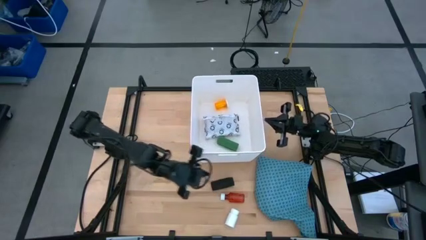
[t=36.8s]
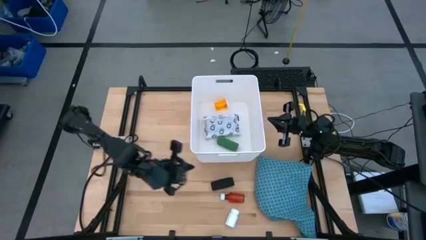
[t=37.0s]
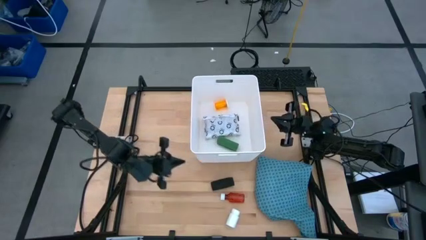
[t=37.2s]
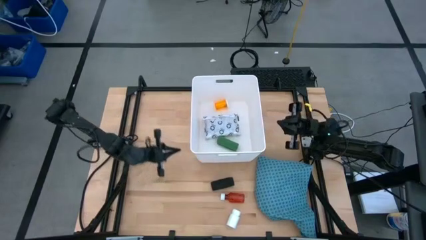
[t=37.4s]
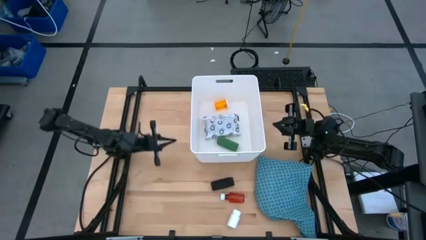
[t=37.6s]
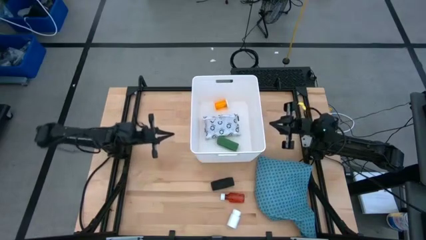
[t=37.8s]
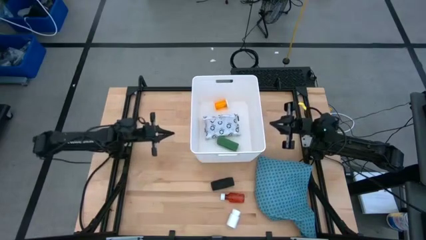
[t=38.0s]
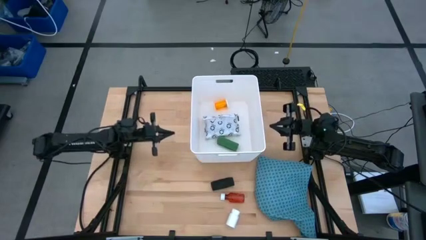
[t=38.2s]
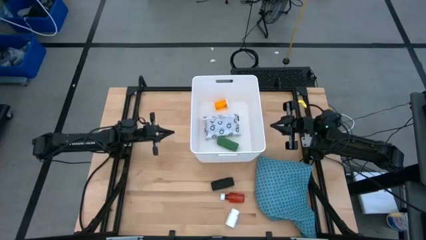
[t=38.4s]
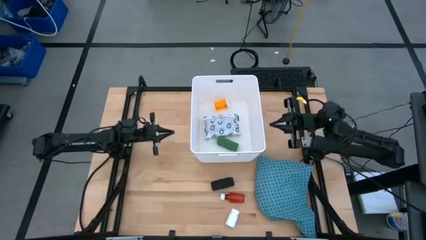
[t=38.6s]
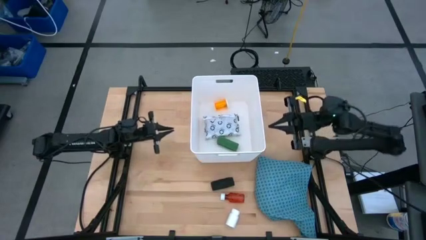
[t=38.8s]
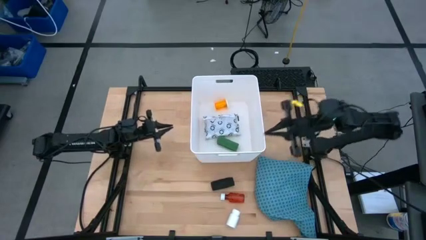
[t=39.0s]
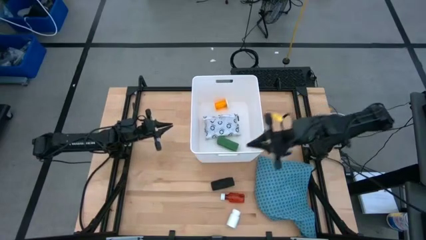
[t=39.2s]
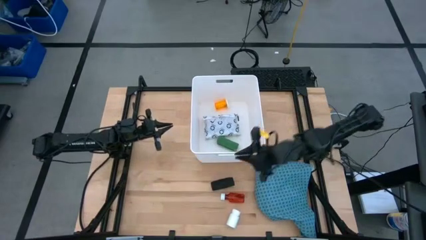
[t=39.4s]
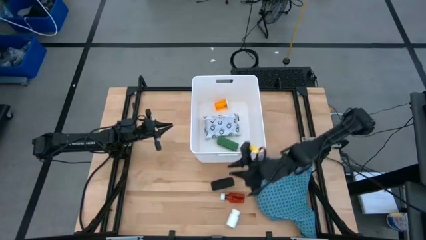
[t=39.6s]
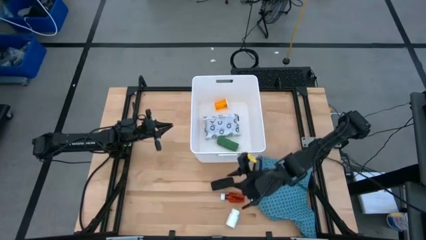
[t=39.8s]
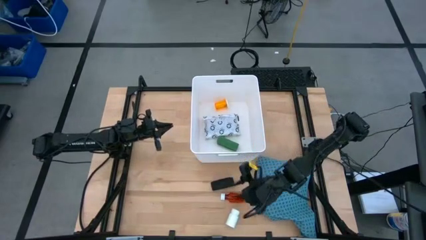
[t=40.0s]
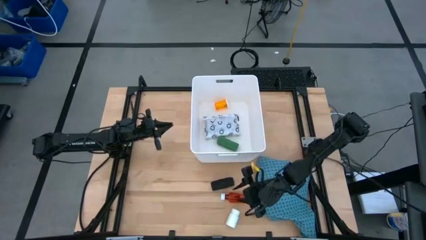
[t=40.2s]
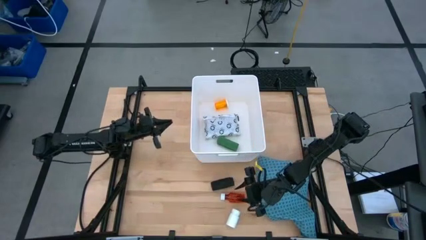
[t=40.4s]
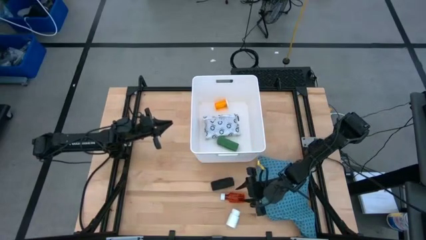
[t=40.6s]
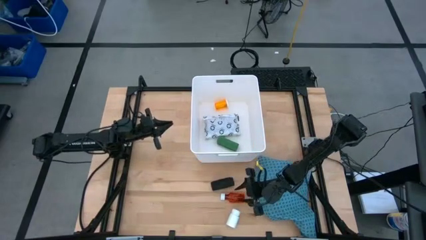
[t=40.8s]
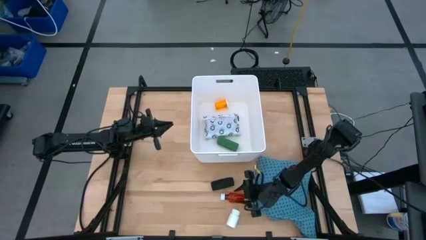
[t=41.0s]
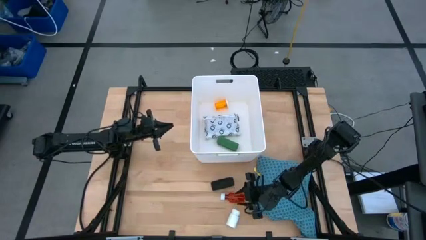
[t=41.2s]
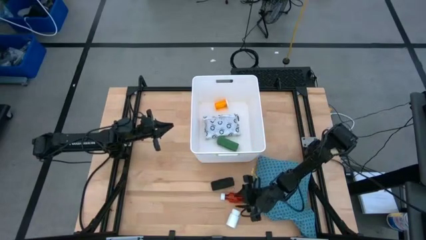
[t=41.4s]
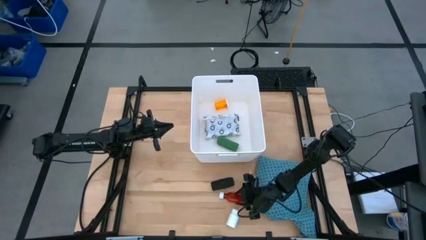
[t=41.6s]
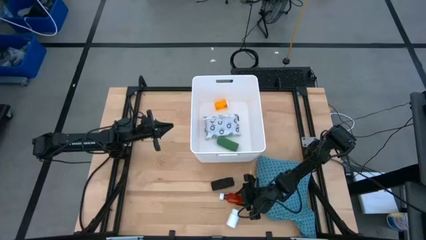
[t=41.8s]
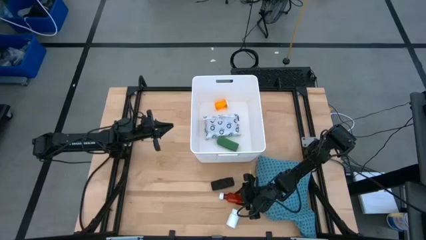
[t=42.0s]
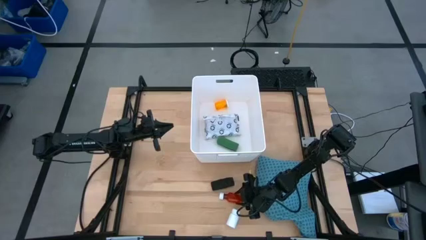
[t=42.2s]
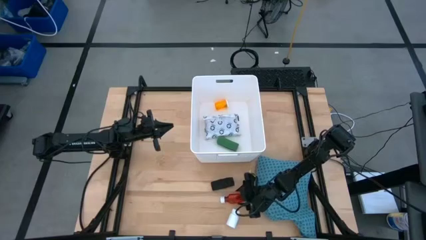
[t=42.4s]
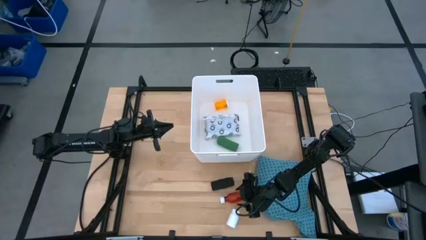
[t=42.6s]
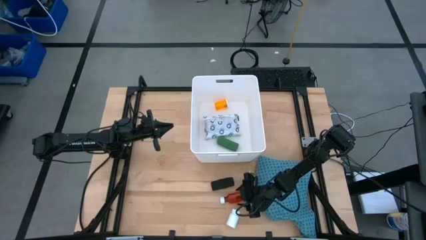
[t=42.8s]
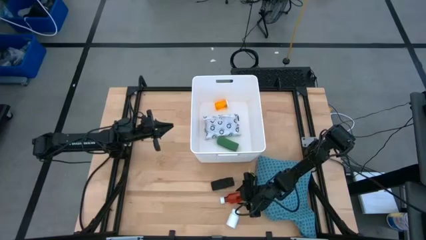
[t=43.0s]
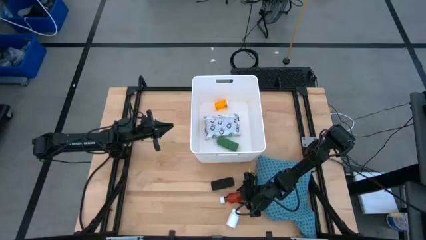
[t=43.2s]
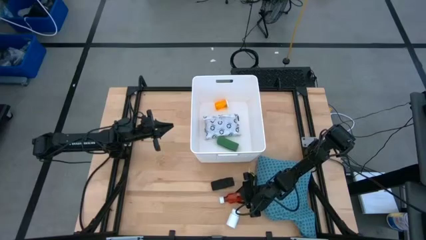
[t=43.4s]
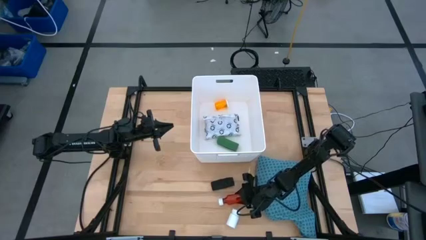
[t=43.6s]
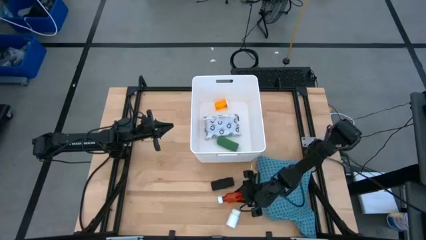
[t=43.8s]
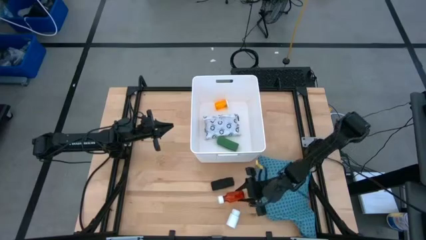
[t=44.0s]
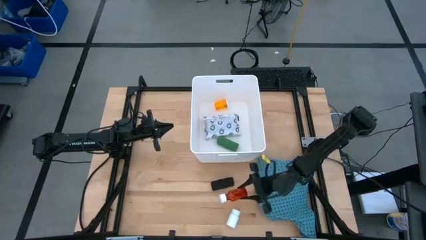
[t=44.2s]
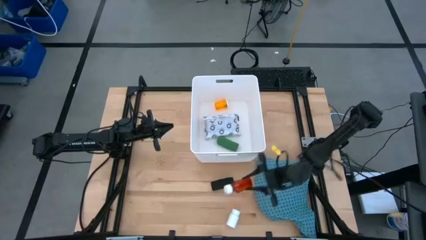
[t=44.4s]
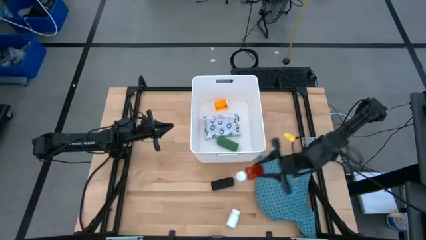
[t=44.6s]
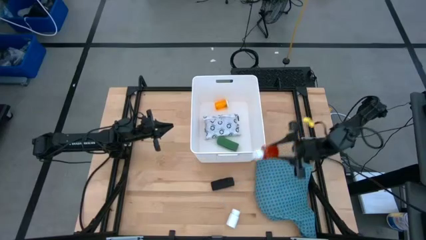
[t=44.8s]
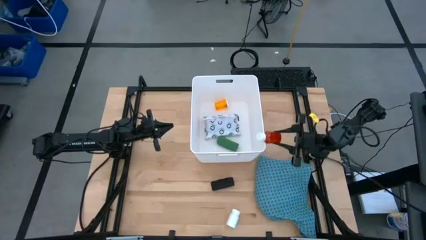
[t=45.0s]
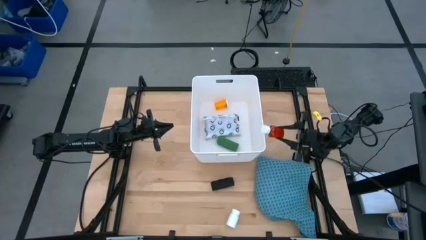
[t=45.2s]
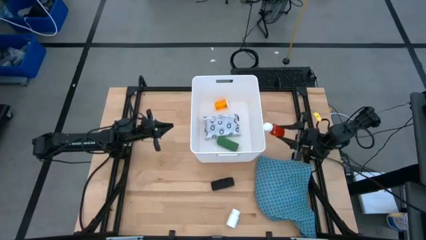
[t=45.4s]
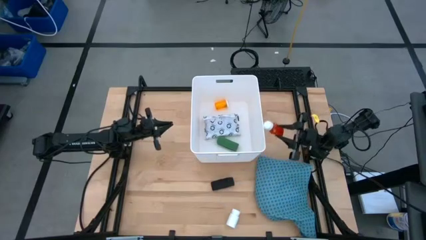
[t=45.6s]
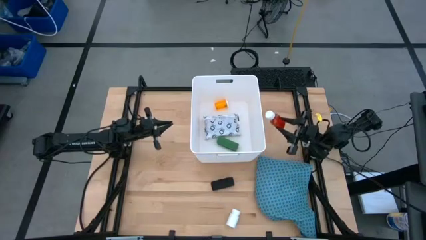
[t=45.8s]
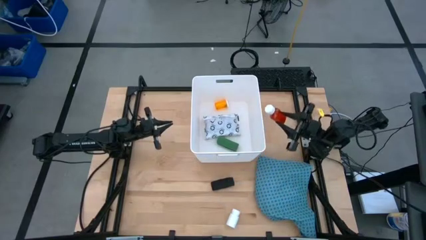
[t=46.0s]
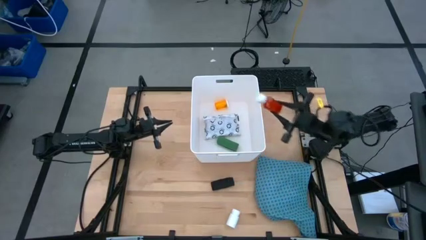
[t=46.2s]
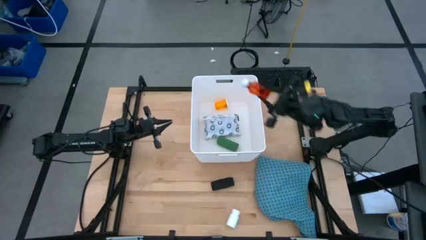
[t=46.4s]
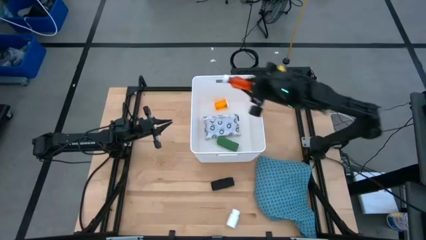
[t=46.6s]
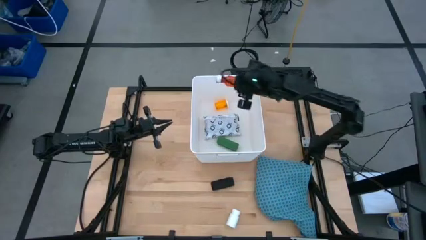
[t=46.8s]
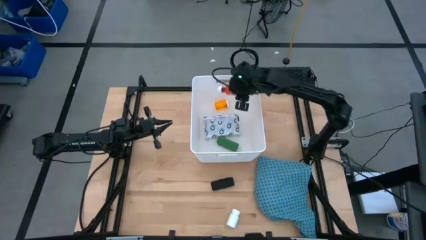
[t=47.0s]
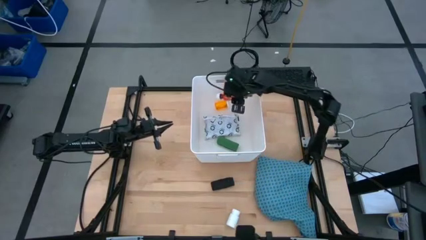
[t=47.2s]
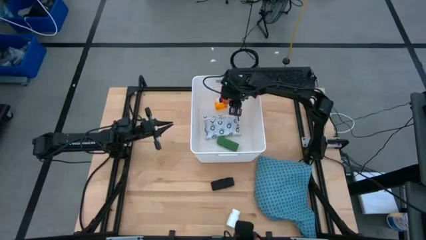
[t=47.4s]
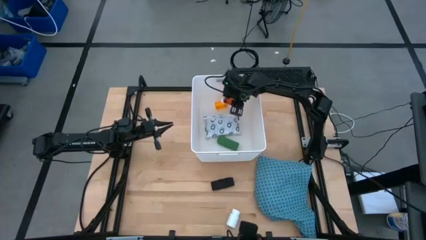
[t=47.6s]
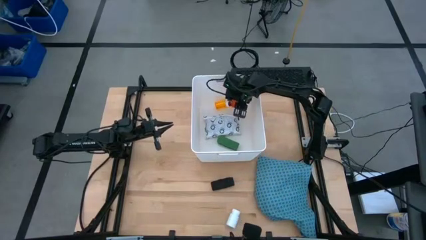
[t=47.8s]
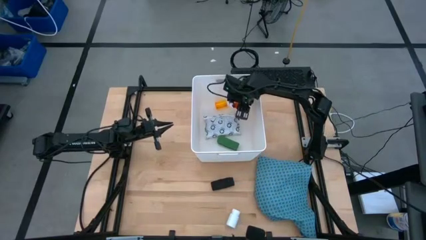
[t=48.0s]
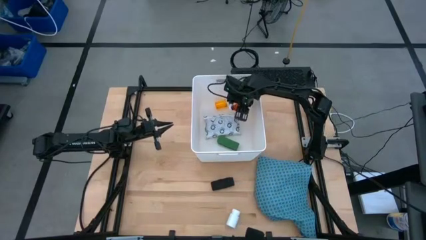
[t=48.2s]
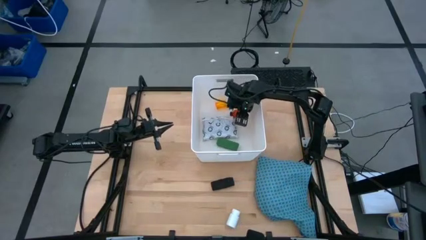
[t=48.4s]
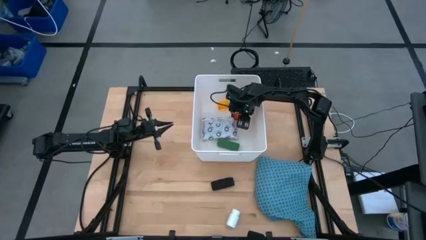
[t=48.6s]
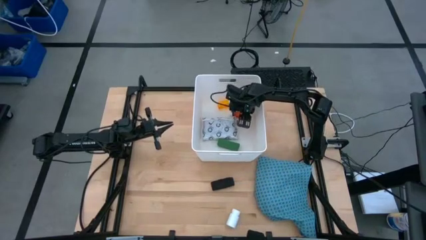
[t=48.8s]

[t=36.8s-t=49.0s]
Task: Pick & place medical supplies in basket/bin
Put the red pill bottle into the white bin
